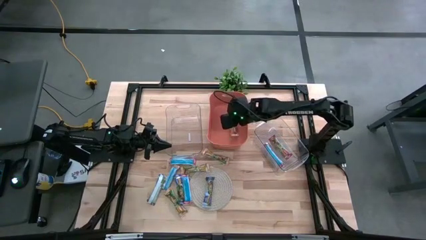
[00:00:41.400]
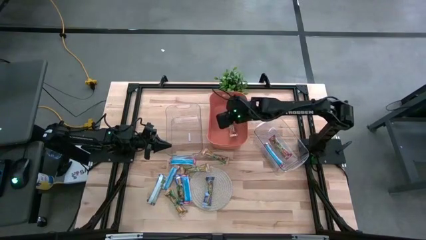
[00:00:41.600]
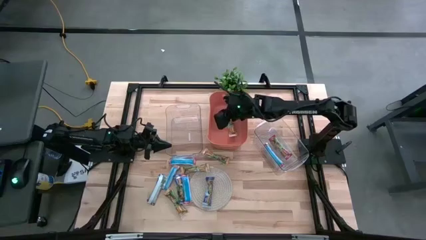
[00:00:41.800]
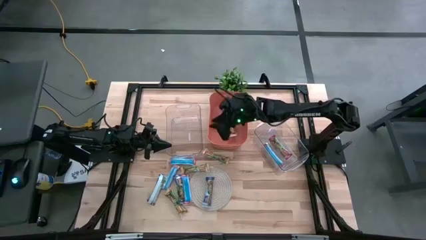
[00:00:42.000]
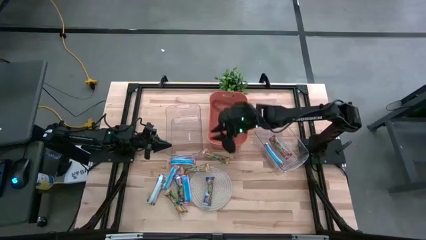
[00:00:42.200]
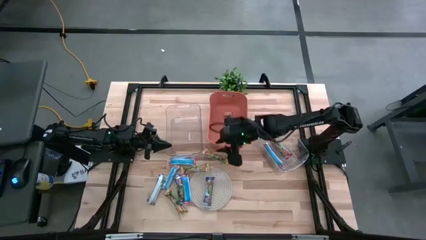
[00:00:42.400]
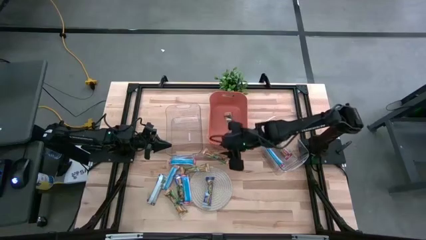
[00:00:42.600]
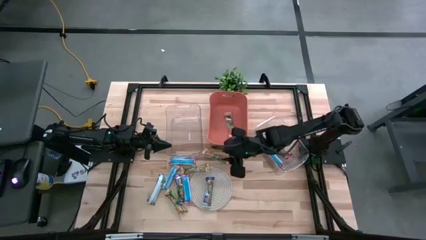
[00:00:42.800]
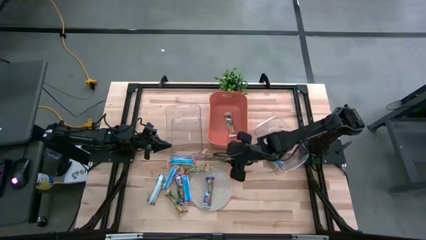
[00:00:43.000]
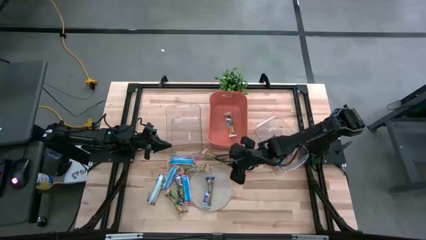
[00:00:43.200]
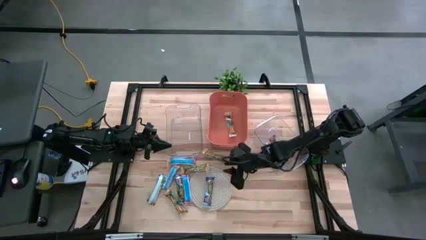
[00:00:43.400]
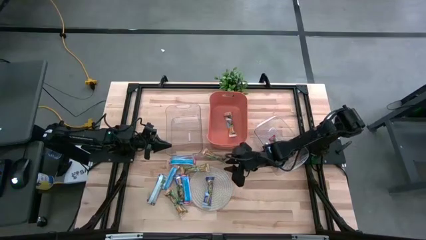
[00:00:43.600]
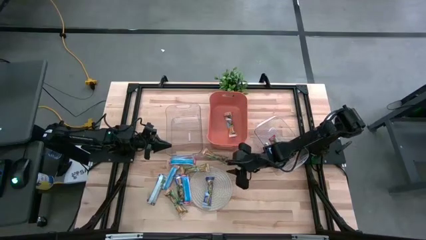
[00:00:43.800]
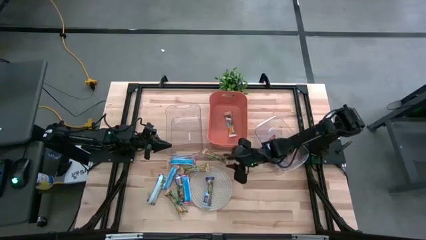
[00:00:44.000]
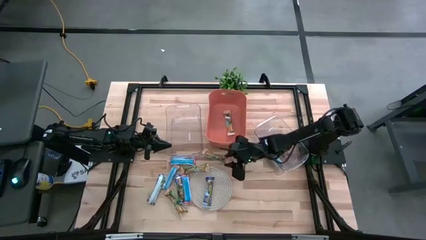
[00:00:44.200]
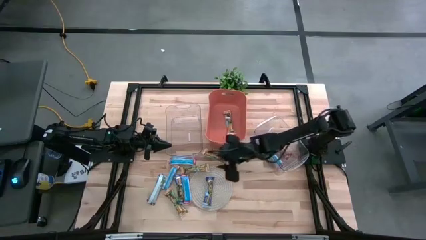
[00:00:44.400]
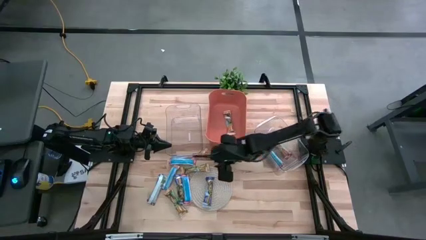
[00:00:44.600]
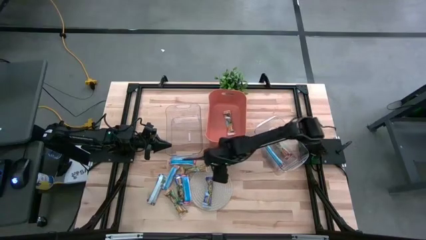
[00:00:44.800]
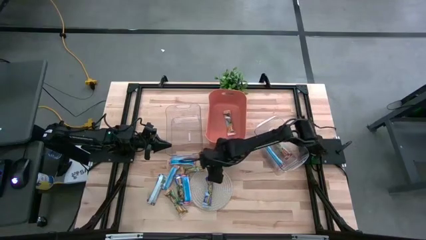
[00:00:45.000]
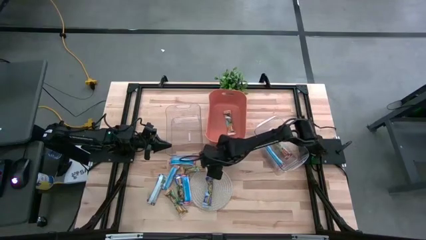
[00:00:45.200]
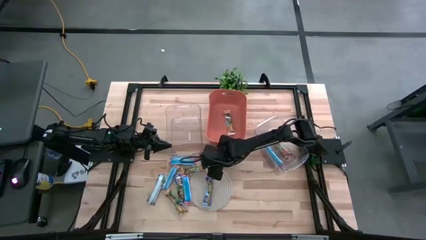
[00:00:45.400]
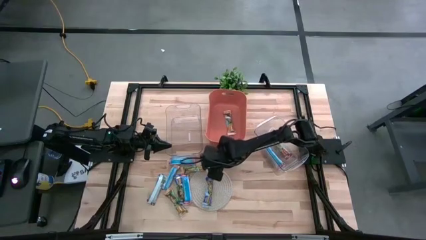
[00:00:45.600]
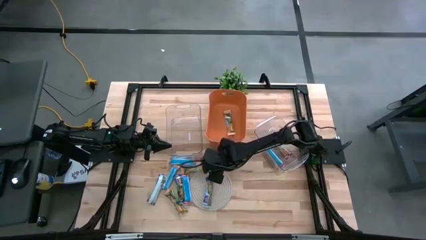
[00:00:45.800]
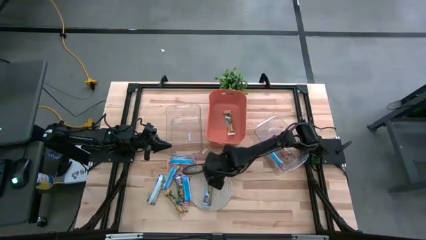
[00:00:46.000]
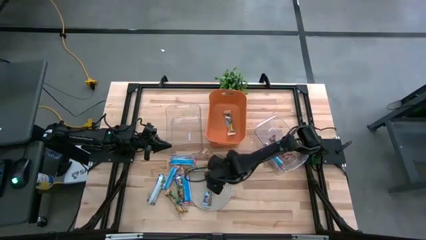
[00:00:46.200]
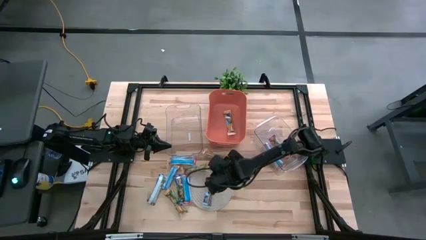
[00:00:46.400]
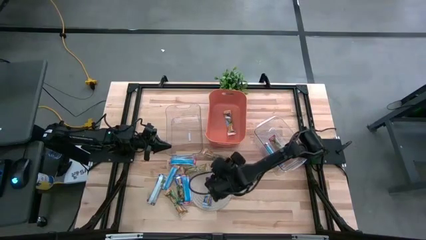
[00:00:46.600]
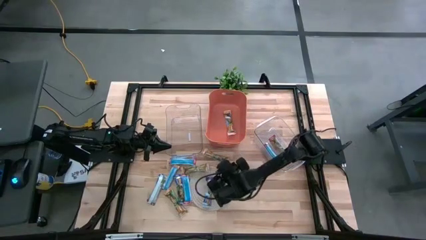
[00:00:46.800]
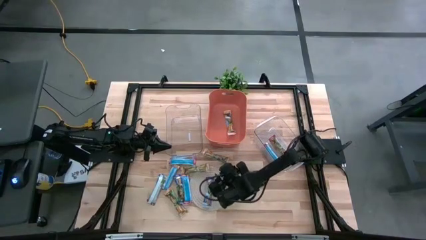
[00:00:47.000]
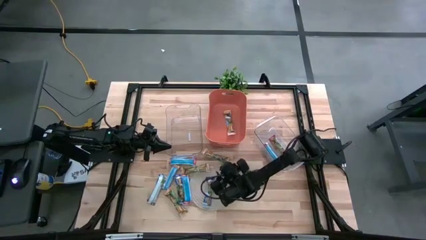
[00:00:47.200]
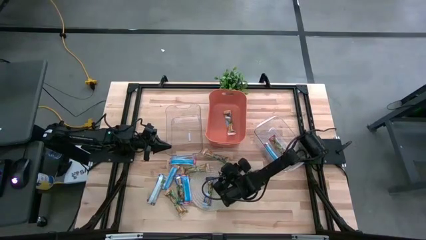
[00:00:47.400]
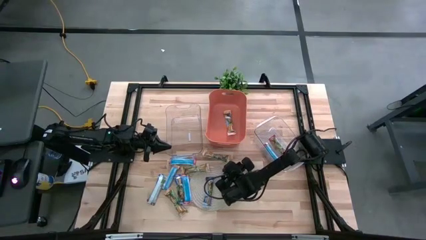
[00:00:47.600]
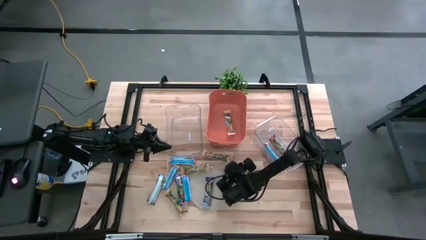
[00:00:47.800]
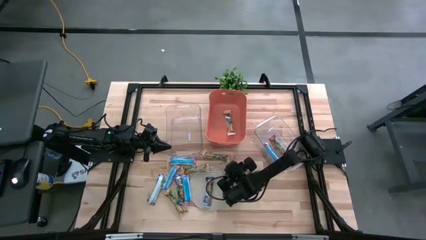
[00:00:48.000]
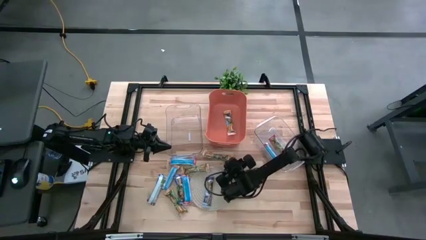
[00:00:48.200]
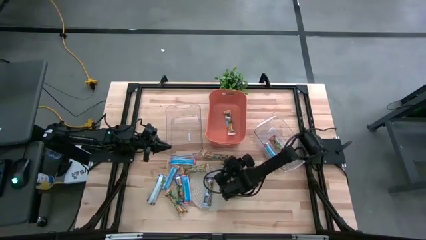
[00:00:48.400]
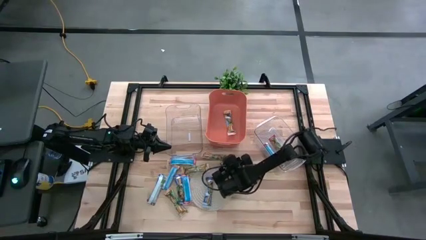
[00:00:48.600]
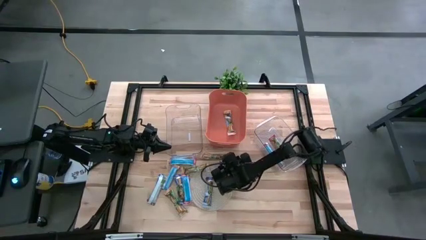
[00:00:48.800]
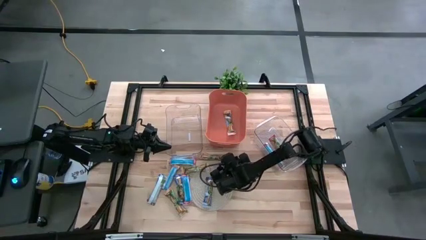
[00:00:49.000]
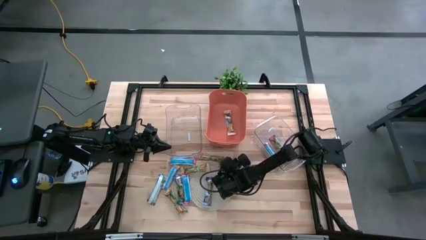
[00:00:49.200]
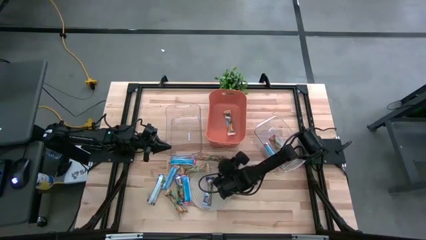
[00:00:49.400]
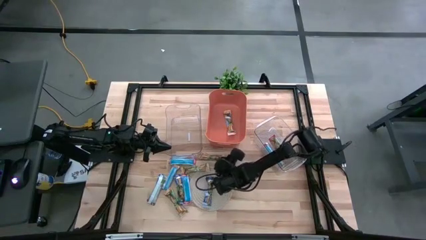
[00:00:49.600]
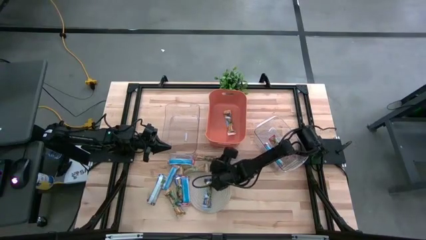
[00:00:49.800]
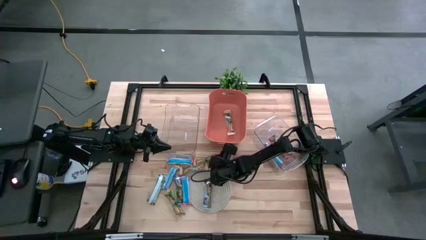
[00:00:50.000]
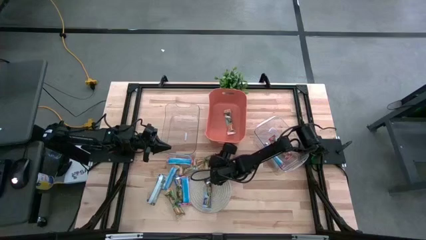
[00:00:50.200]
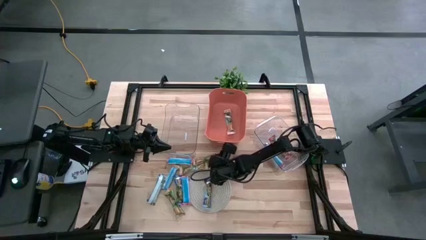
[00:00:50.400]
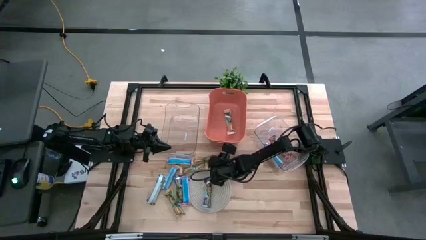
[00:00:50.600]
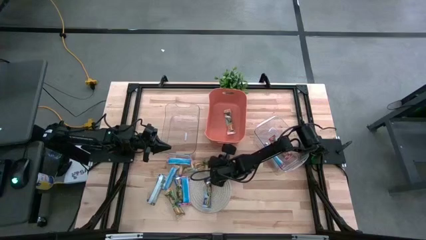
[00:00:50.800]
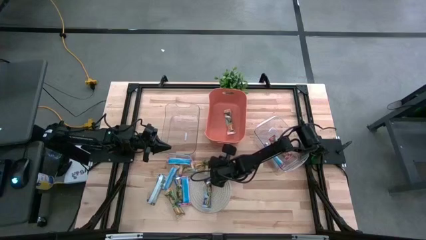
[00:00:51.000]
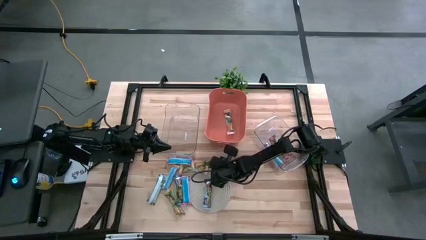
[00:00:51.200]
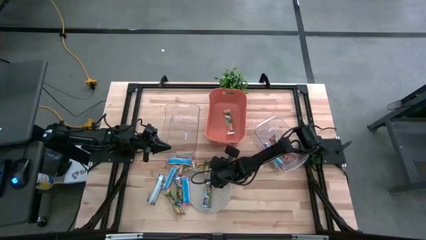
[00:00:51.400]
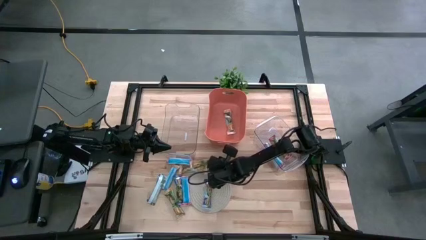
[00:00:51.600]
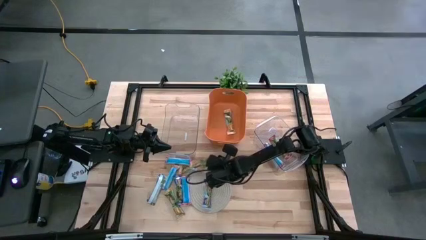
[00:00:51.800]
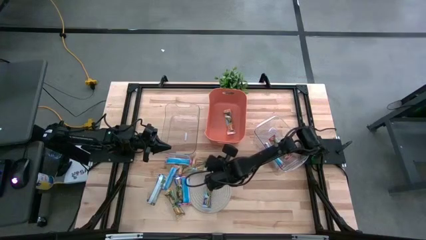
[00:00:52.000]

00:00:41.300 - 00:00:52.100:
Task: Pick and place Granola Bars by type
Put the yellow granola bar into the orange bin

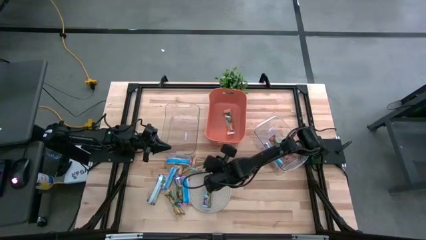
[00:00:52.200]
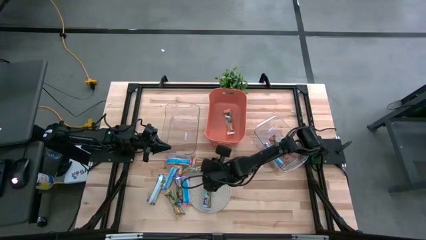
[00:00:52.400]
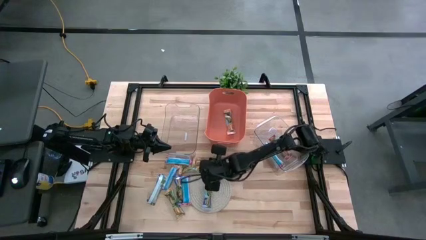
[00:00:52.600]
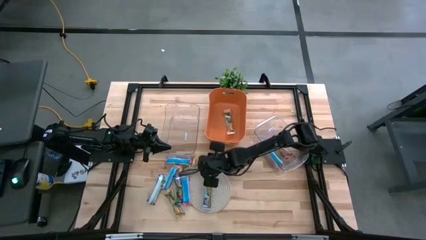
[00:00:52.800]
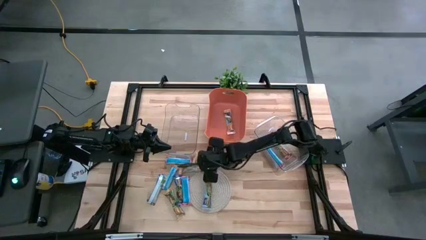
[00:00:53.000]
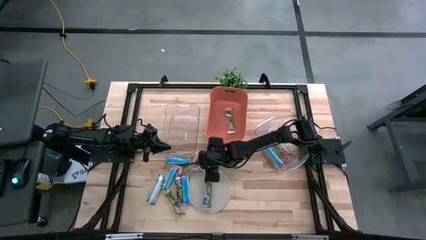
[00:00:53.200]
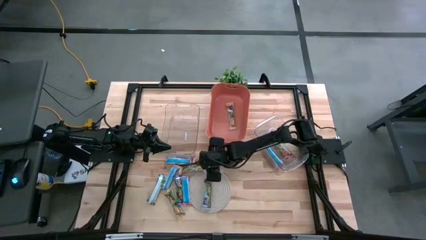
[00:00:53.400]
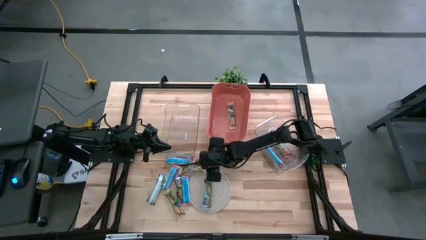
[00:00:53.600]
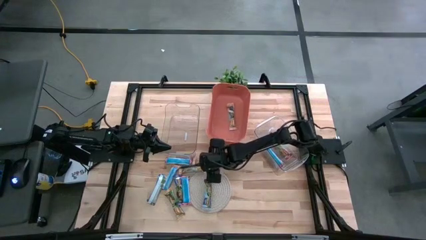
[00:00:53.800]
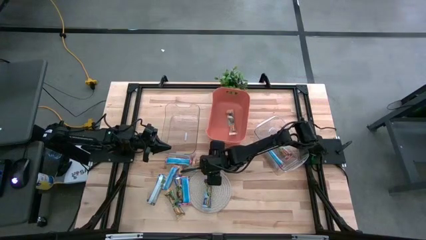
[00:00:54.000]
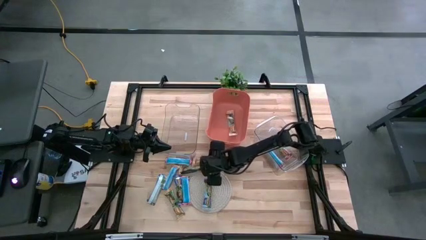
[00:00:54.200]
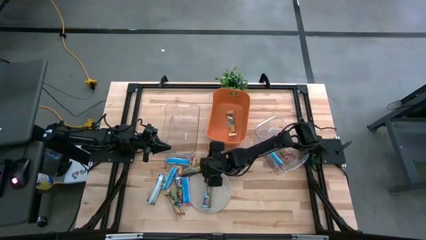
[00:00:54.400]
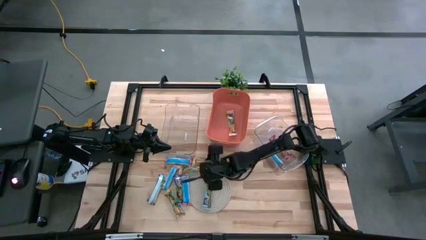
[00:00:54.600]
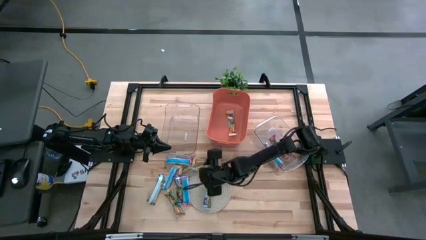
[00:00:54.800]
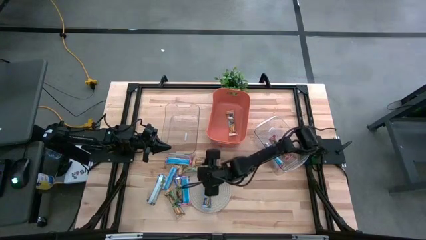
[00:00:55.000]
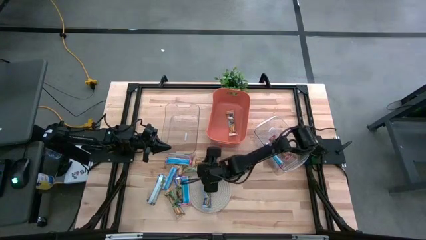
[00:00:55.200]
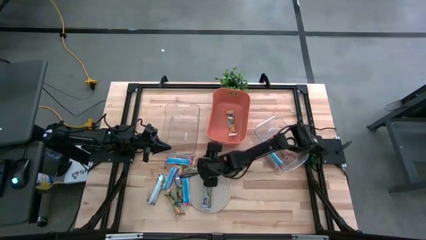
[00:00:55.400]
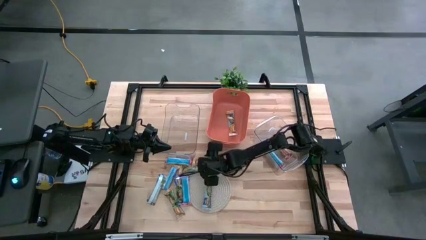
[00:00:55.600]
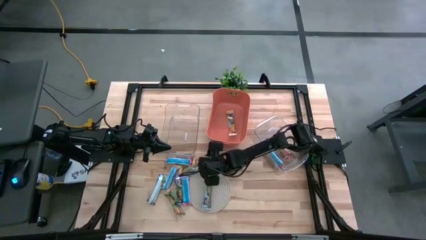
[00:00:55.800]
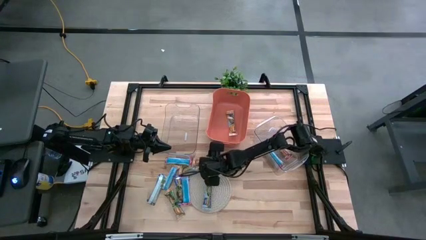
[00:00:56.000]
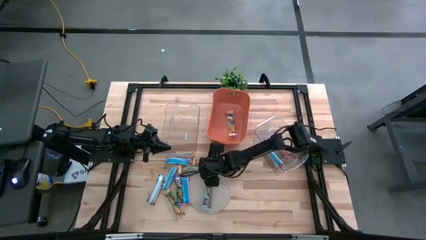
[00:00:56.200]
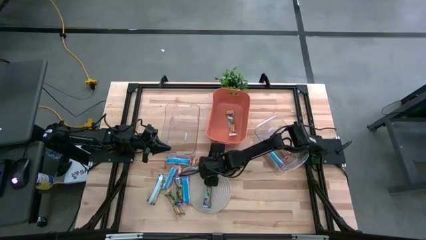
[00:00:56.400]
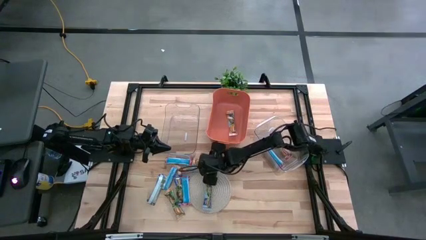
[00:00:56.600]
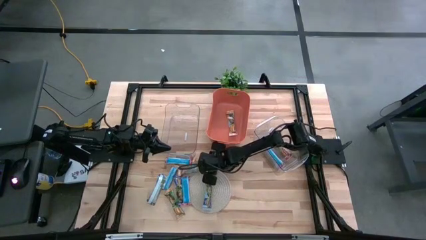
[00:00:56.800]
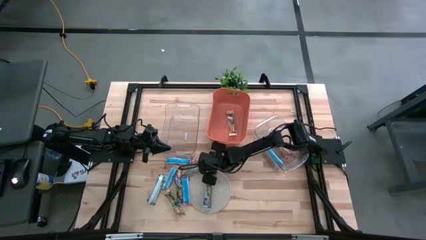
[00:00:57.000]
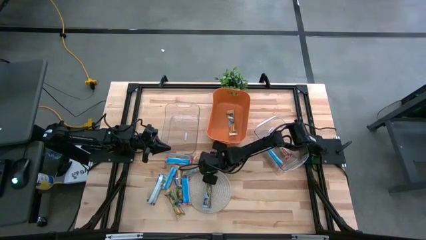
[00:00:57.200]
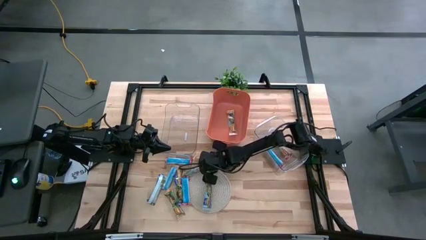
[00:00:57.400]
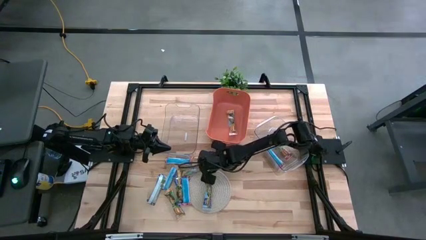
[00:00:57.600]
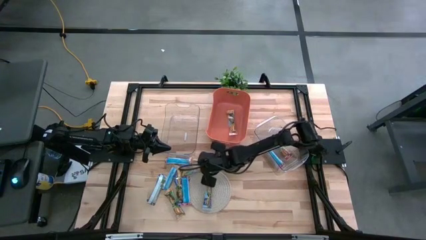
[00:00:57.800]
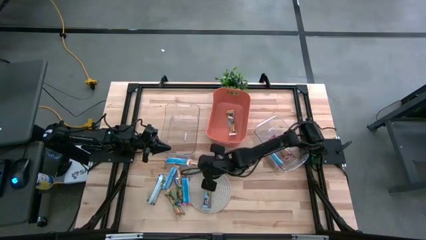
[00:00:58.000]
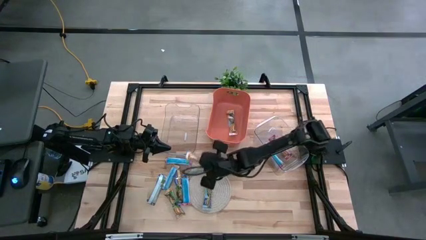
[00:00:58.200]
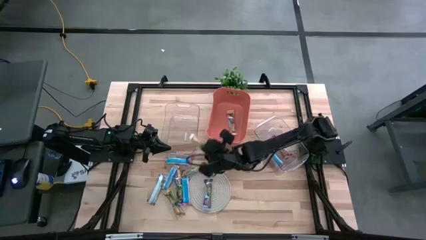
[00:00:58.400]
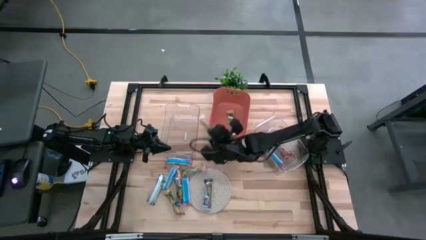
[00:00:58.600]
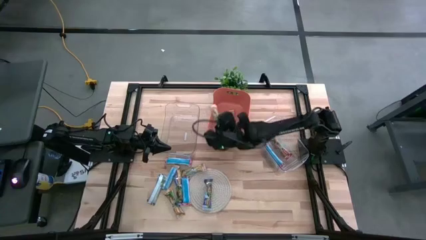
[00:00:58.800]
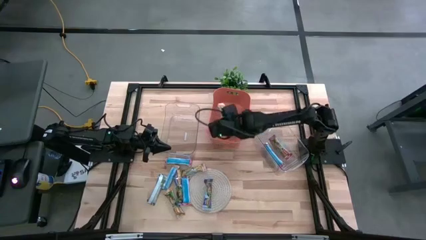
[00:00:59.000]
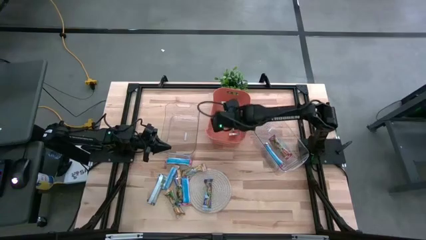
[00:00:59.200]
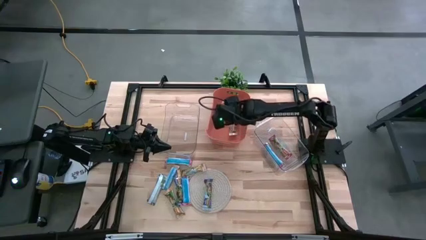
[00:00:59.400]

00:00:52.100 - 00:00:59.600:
Put the yellow granola bar into the orange bin
